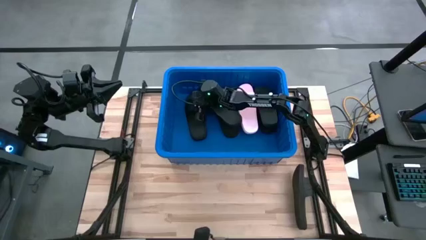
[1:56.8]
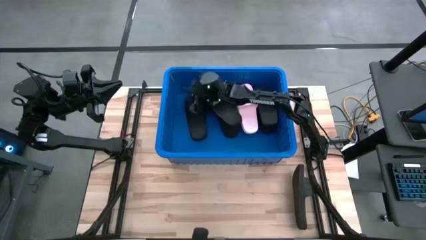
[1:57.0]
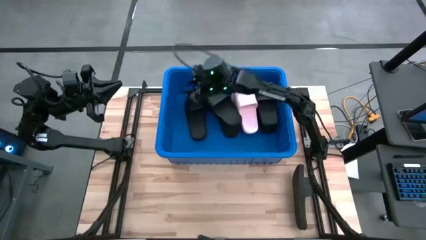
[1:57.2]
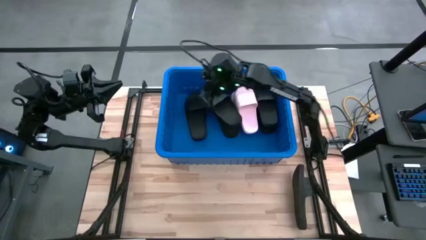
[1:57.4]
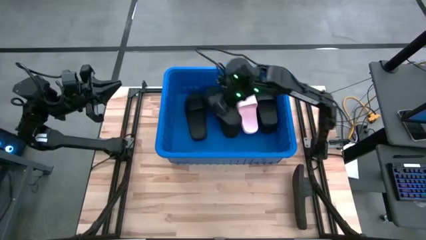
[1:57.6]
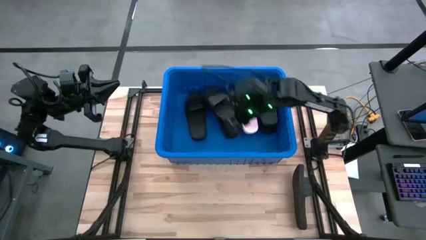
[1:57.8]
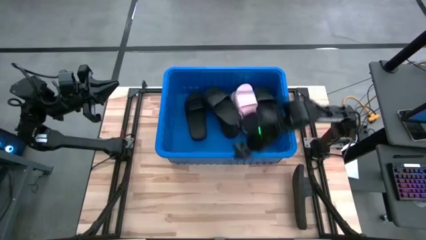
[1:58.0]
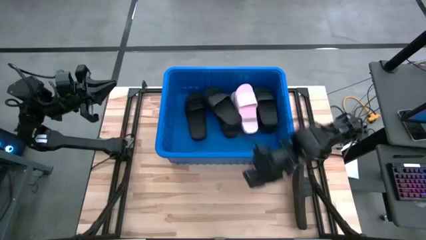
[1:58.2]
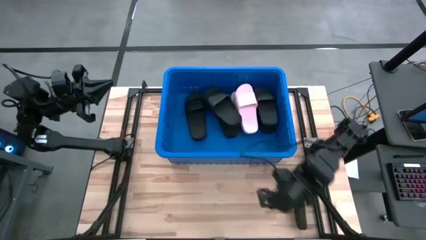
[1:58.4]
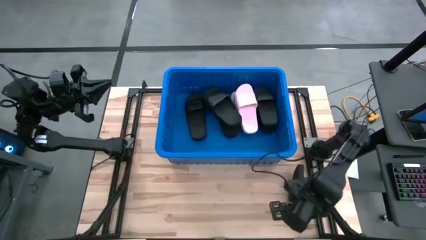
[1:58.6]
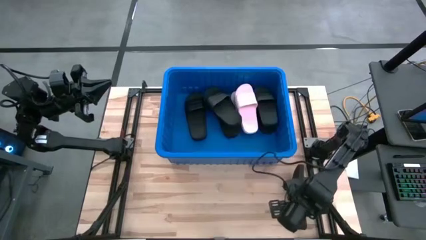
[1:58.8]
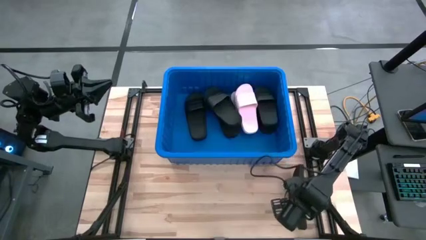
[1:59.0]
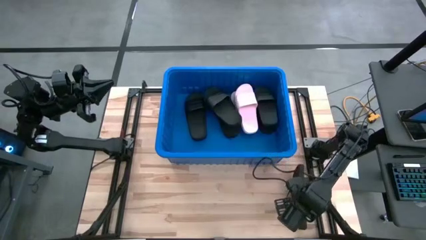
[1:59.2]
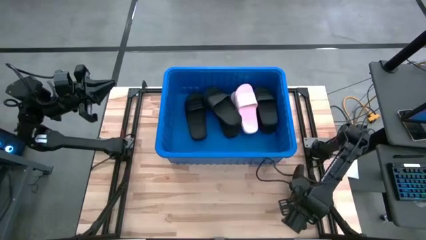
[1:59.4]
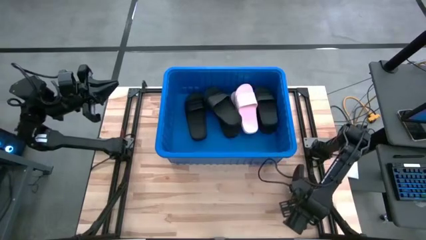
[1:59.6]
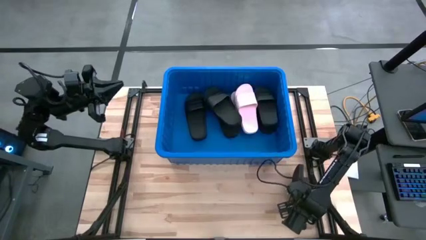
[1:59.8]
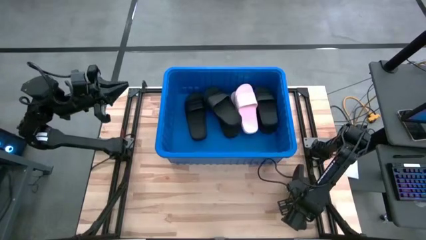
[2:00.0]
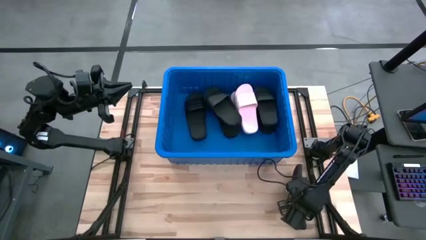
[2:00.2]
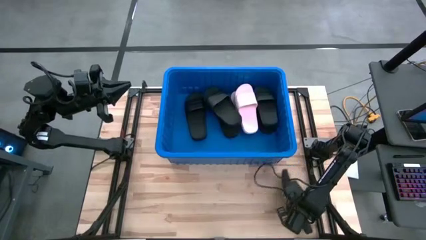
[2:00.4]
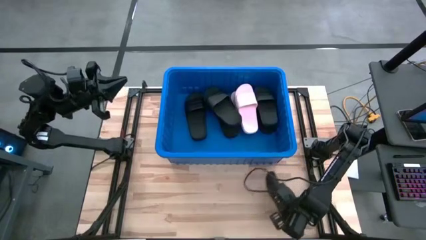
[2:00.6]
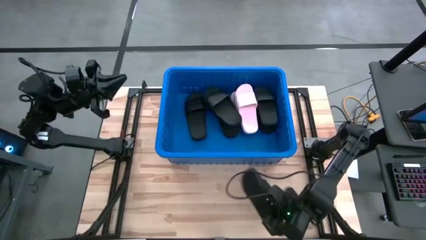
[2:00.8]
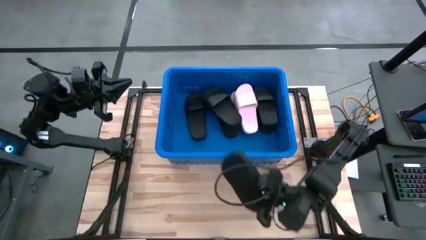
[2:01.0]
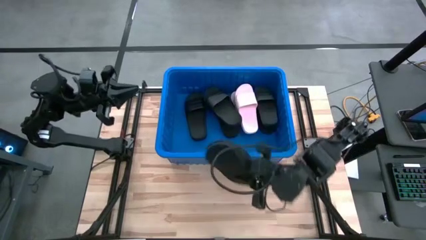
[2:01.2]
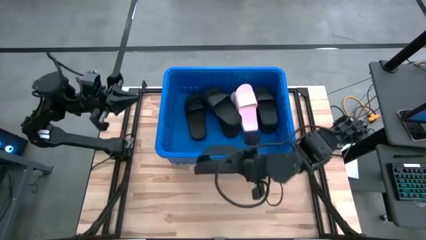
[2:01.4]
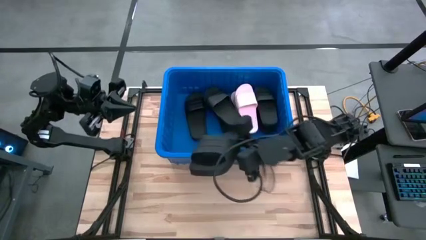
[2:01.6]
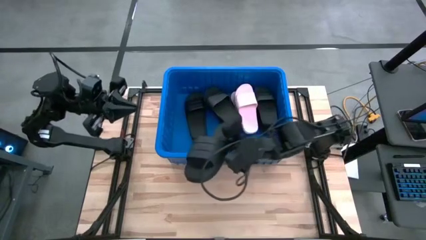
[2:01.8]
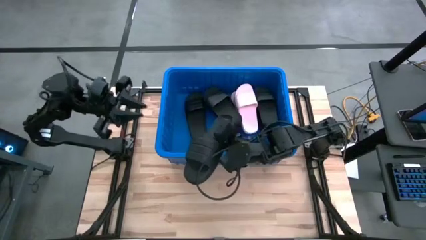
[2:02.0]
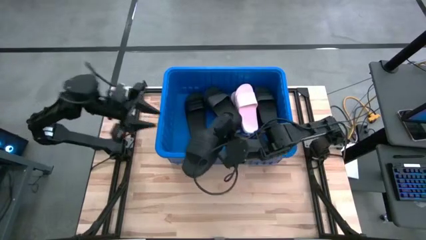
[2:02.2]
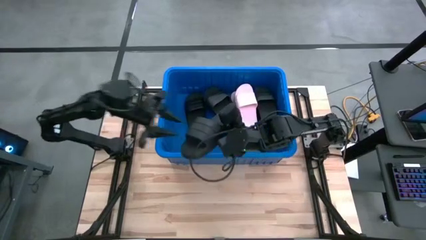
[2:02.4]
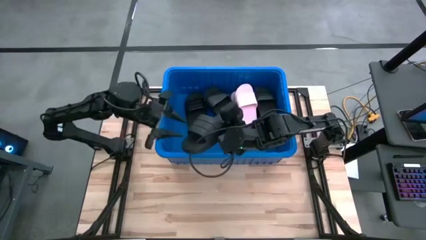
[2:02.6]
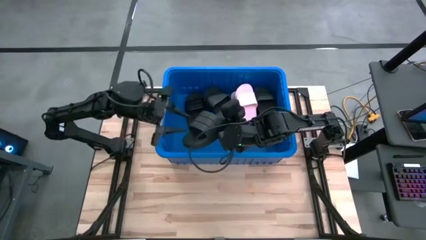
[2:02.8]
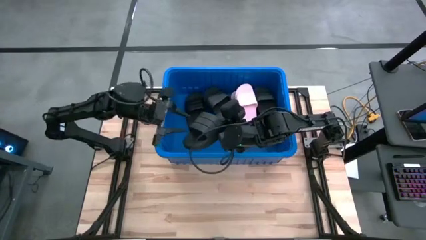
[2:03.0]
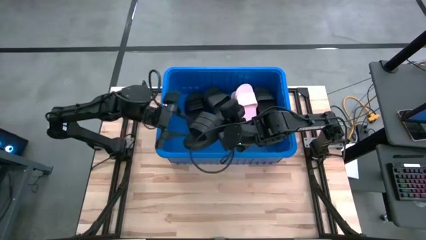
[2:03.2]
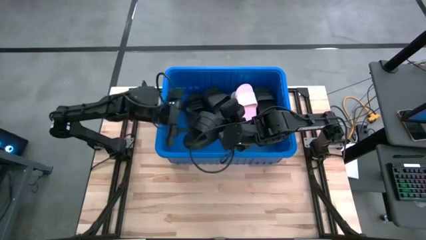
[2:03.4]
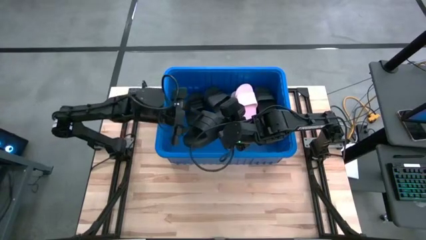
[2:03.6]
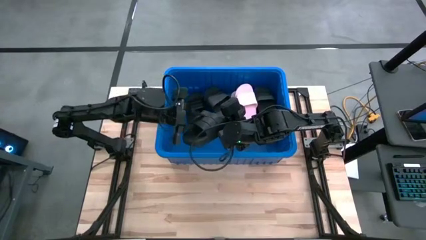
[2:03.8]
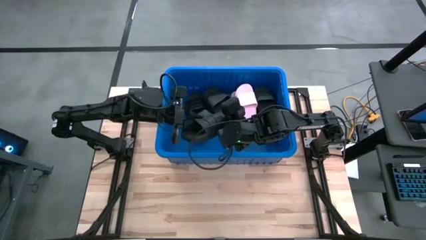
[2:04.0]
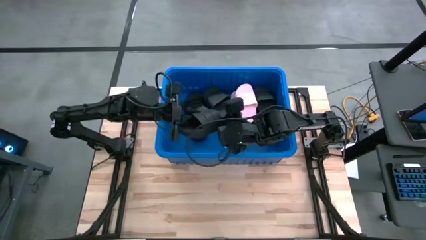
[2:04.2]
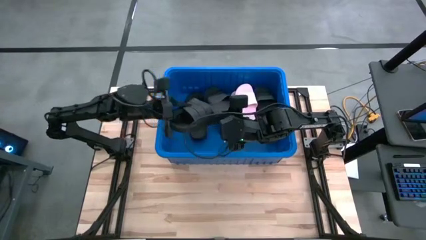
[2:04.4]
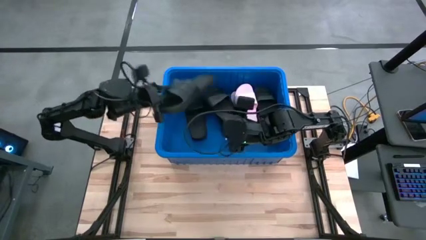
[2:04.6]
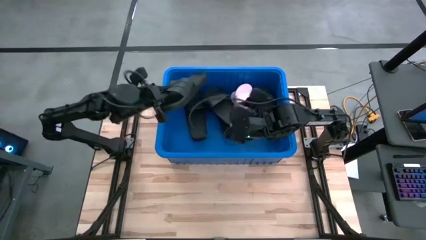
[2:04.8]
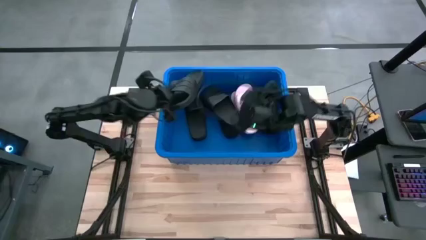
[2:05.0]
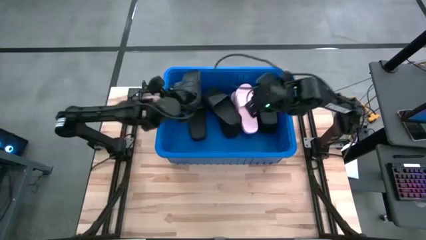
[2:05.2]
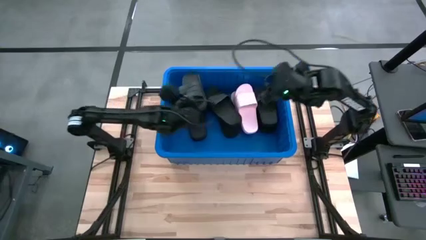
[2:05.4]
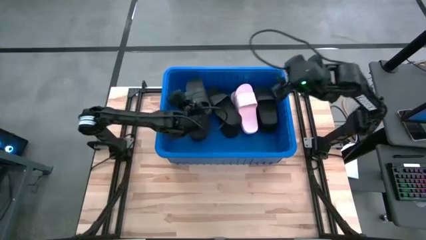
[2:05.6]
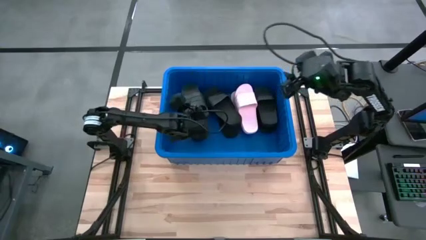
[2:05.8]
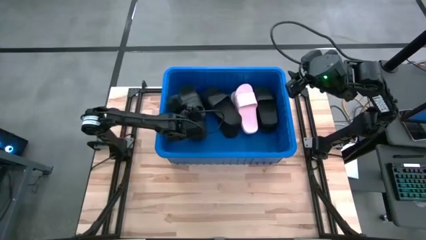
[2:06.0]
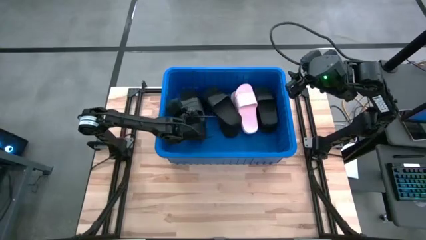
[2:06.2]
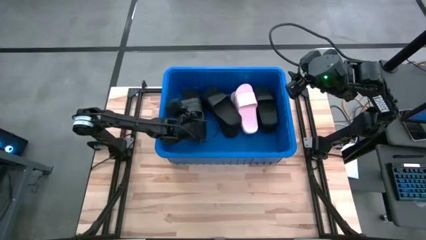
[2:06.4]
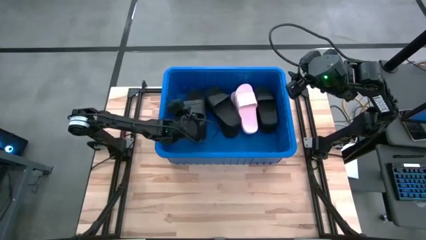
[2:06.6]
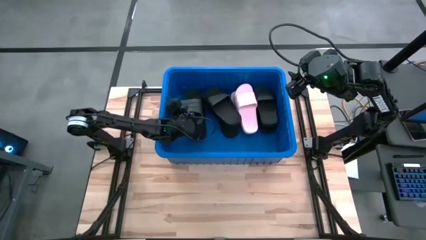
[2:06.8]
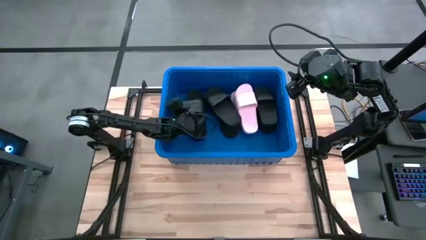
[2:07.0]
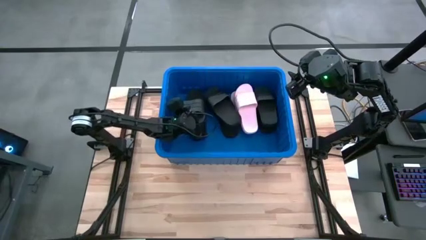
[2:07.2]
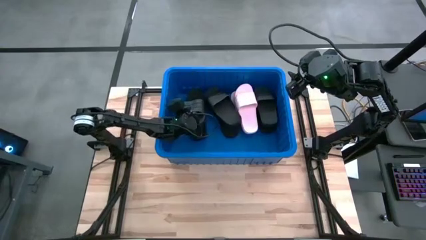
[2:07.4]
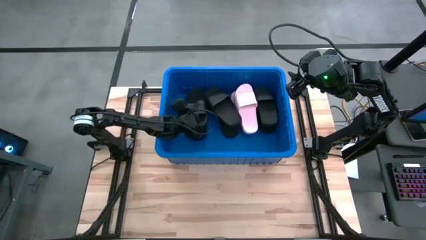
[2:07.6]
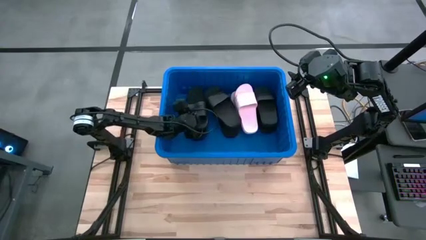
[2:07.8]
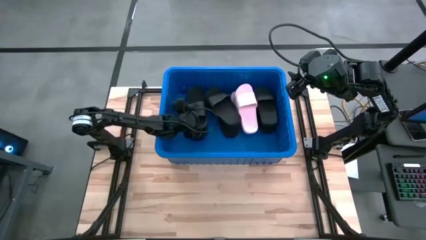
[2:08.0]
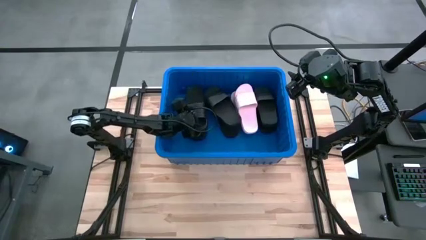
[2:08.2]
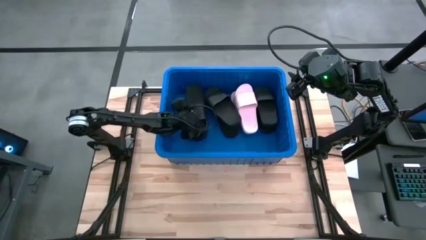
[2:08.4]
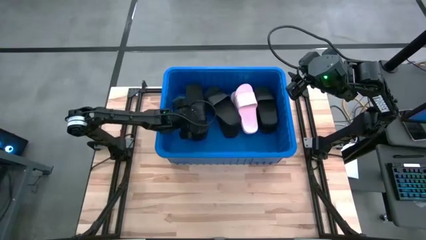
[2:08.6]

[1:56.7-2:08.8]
Task: Pick and place slides into bin
Put the black slide into the blue bin
